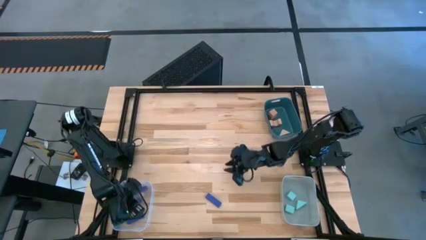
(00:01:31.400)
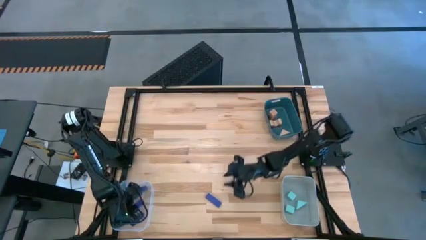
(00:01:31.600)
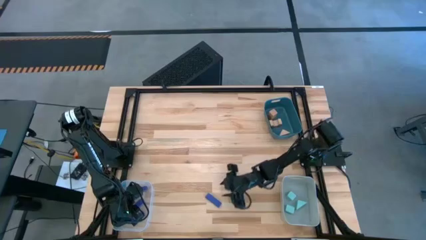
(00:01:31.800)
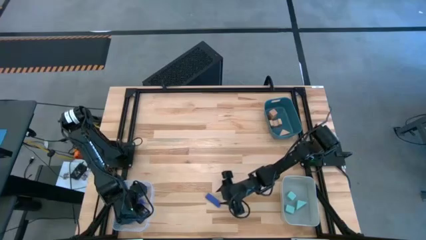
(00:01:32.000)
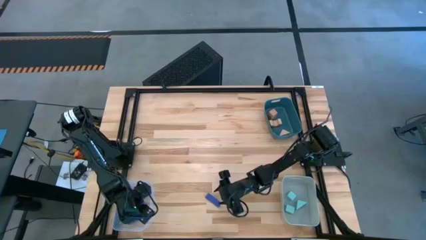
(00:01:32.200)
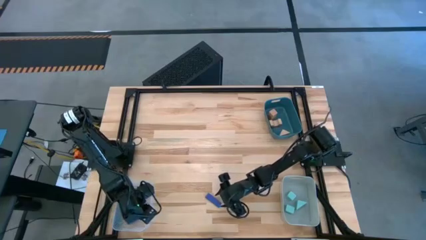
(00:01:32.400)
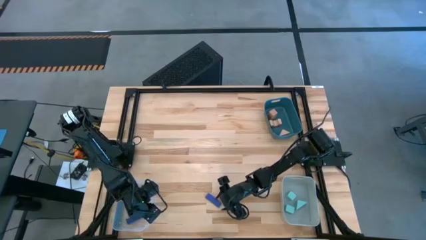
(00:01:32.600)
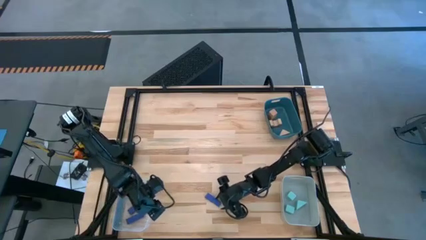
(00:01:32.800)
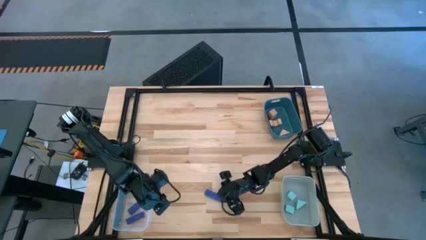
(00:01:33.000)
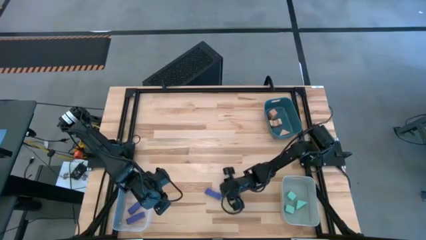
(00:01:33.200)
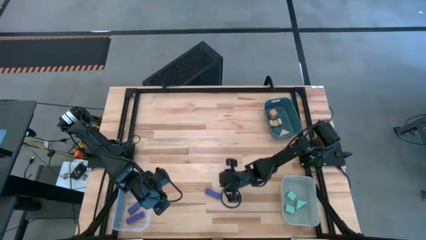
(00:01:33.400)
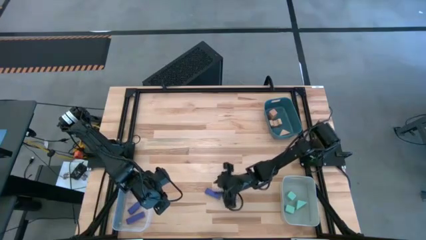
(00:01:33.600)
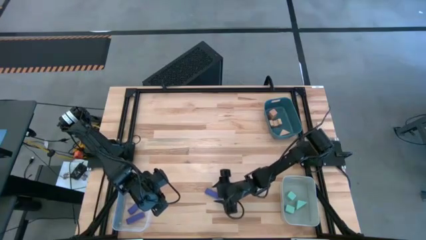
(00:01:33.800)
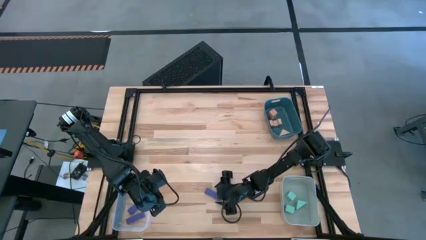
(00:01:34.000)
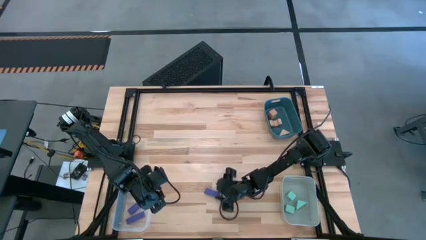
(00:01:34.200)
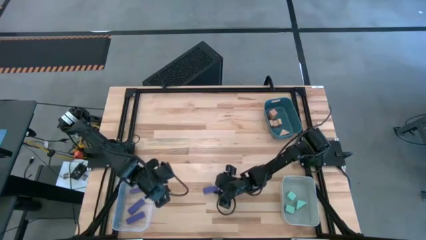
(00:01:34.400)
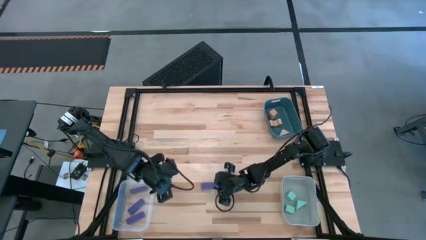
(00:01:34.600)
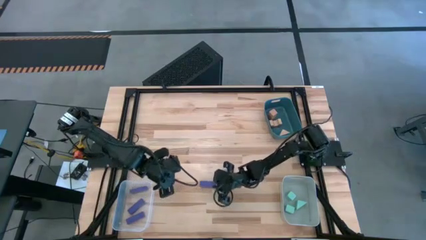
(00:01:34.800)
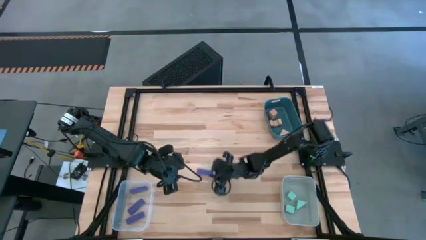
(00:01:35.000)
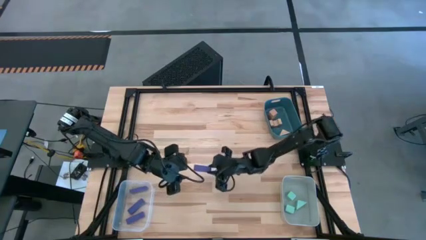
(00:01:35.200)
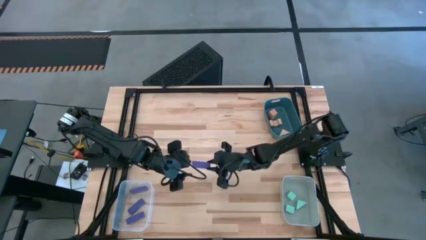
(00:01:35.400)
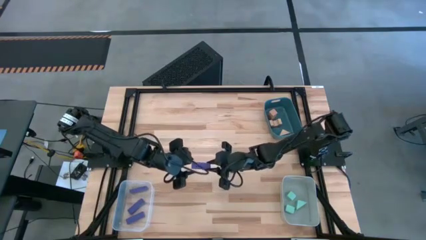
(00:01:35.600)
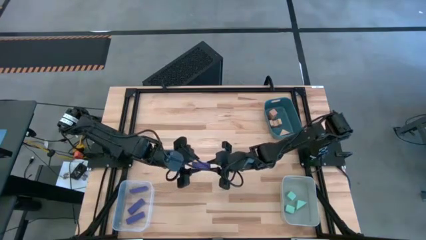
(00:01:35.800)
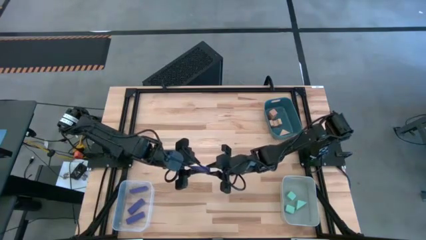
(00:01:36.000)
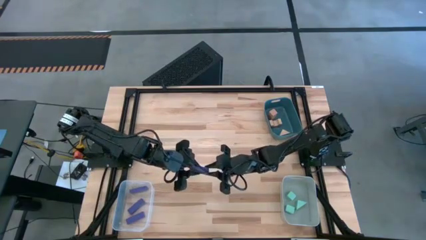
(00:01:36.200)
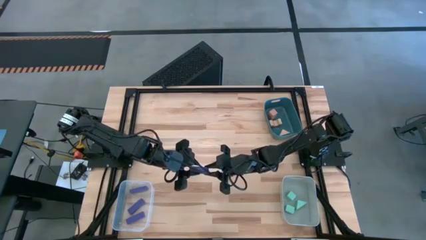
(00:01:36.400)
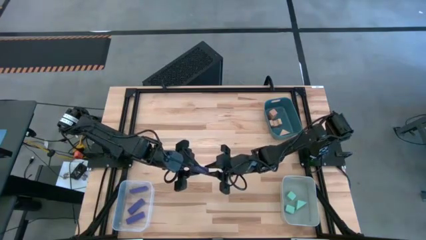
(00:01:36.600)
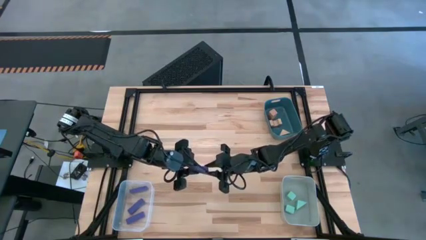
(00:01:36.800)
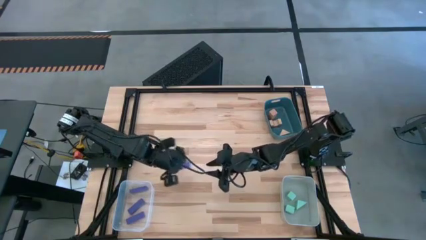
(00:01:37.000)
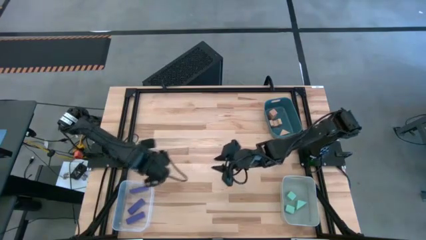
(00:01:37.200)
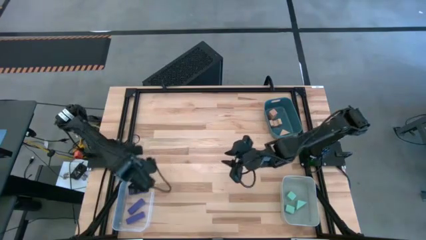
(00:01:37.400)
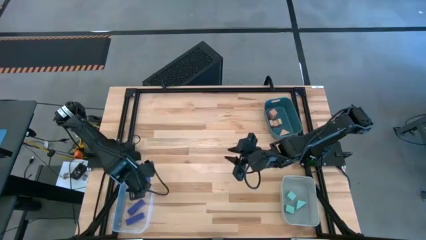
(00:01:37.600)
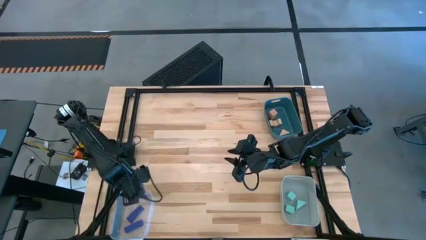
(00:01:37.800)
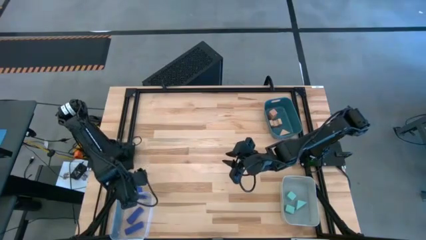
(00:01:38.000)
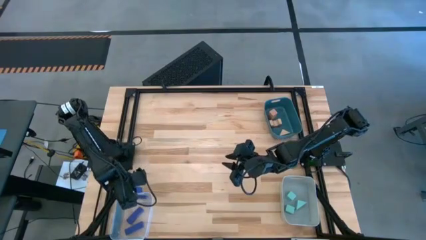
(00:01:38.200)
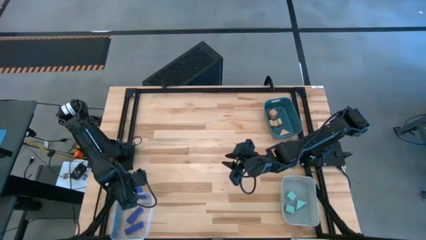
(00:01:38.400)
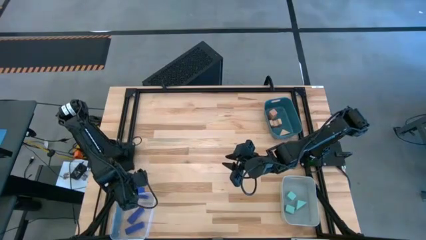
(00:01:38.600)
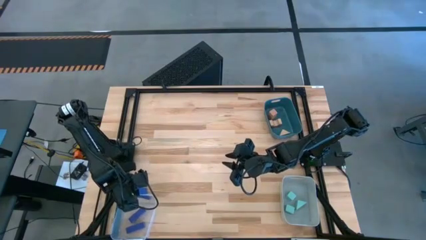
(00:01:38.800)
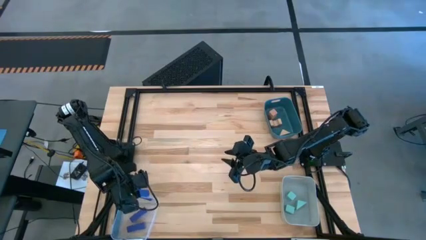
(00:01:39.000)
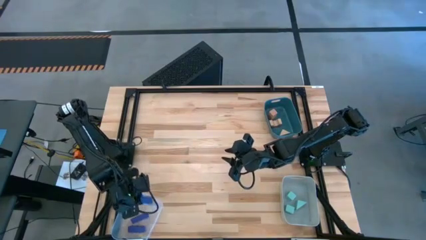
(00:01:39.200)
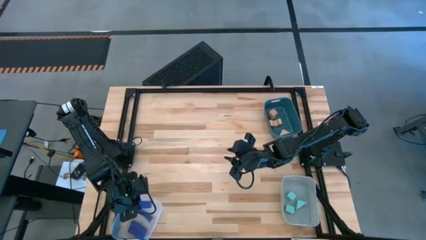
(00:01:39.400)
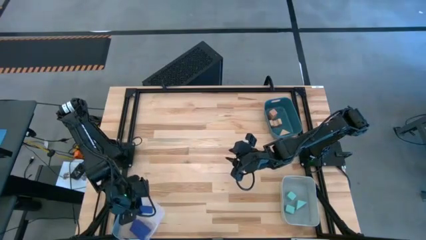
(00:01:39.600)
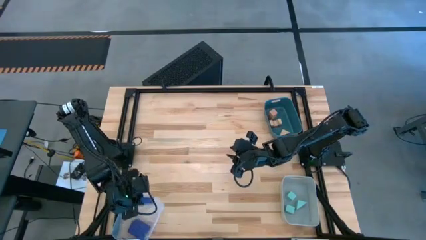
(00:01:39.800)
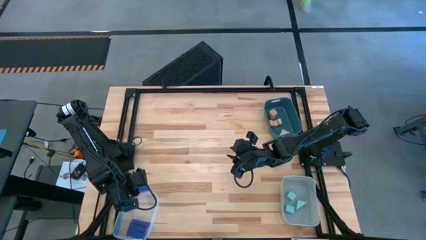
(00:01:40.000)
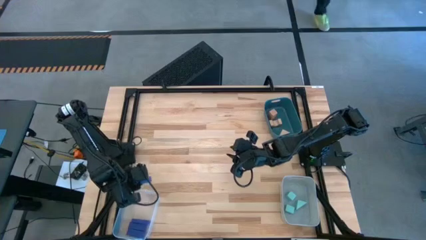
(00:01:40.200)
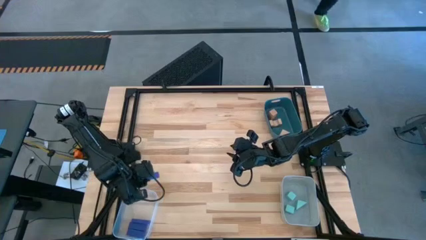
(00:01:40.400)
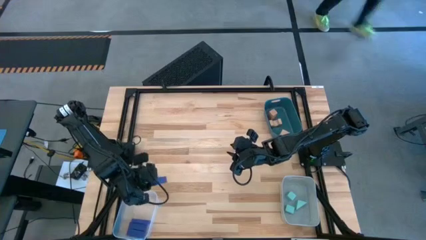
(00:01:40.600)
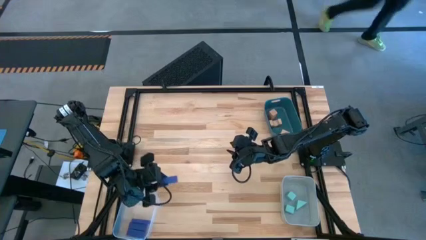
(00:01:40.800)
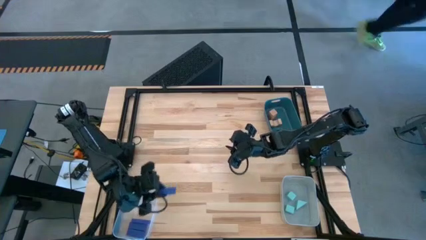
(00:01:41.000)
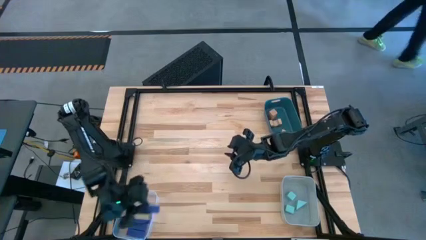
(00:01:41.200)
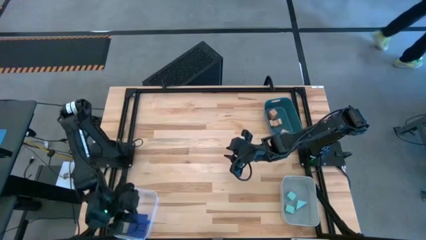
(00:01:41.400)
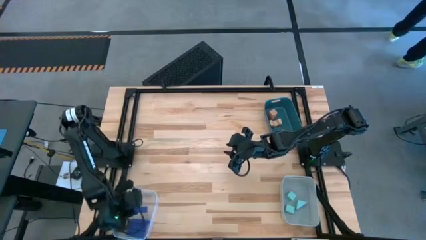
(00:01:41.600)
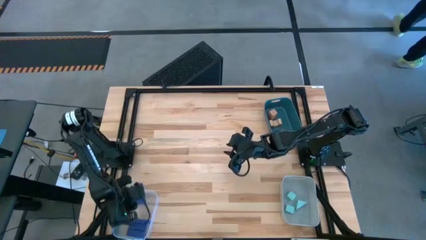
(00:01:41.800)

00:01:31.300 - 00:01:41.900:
Task: Sort & place blocks by color
Put the blue block into the transparent bin

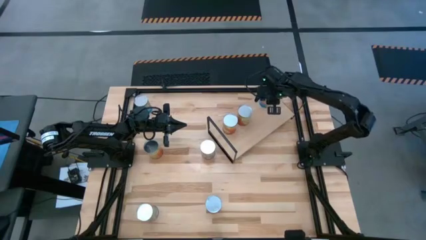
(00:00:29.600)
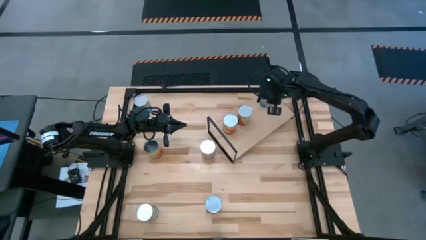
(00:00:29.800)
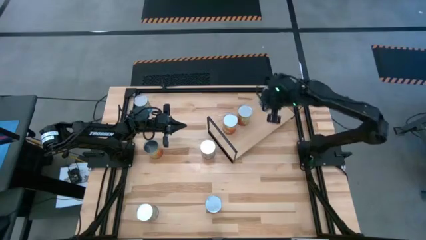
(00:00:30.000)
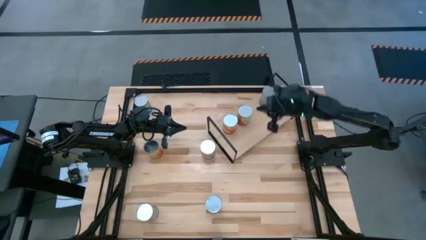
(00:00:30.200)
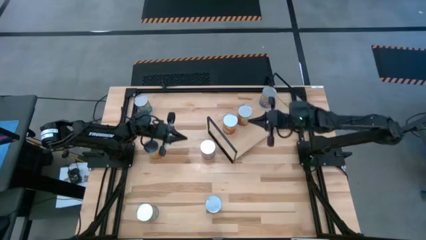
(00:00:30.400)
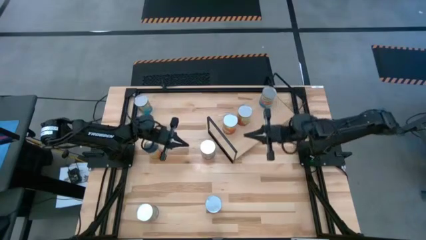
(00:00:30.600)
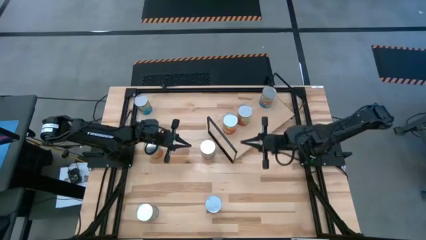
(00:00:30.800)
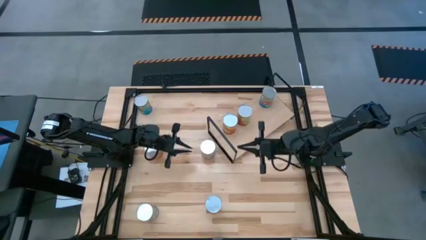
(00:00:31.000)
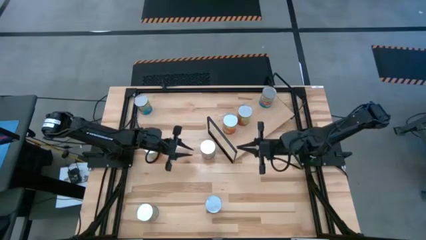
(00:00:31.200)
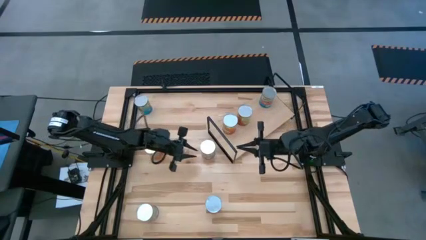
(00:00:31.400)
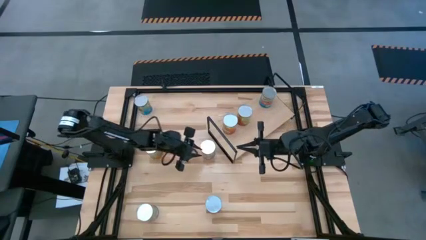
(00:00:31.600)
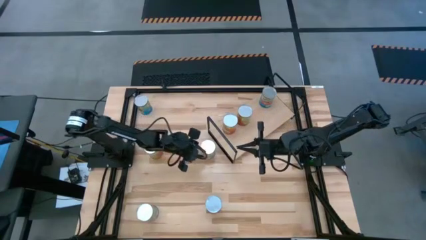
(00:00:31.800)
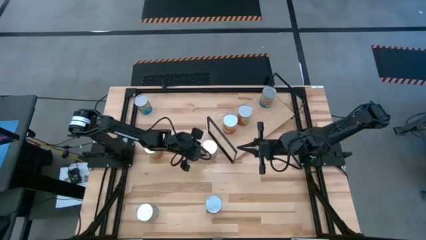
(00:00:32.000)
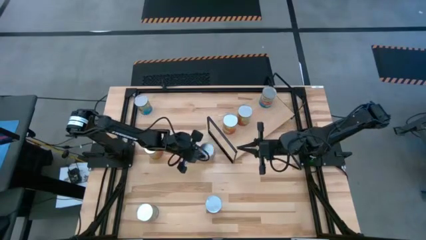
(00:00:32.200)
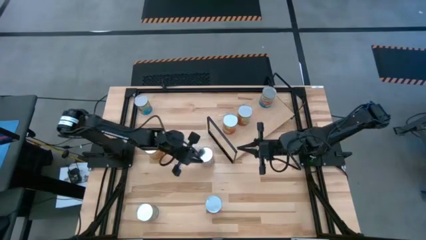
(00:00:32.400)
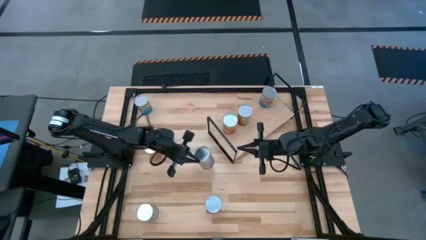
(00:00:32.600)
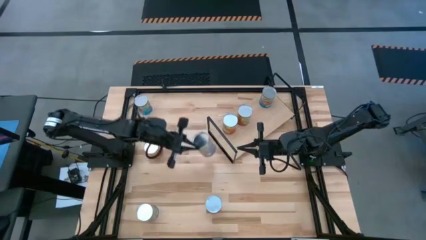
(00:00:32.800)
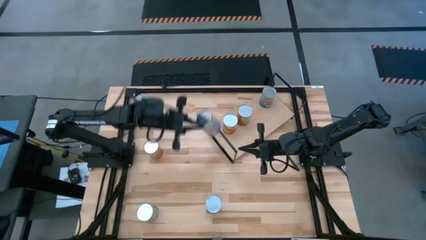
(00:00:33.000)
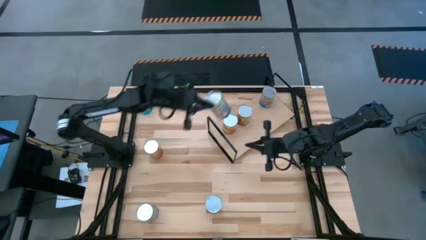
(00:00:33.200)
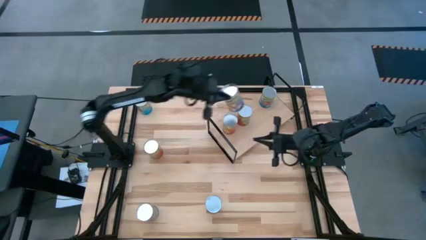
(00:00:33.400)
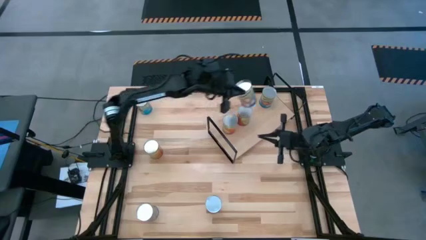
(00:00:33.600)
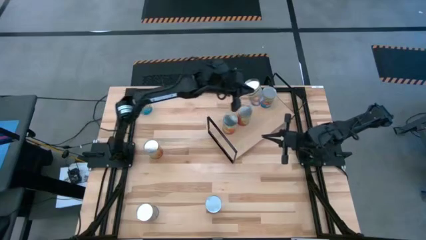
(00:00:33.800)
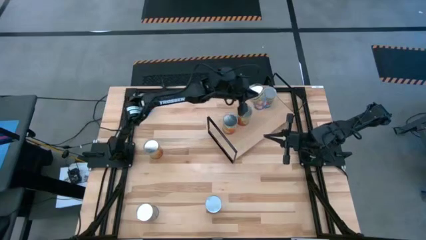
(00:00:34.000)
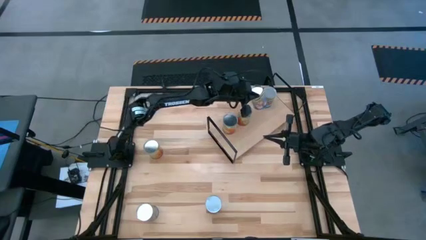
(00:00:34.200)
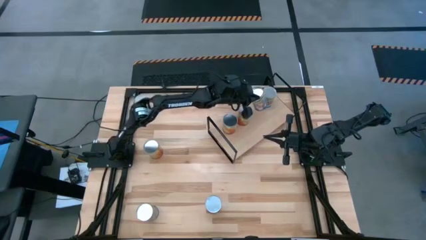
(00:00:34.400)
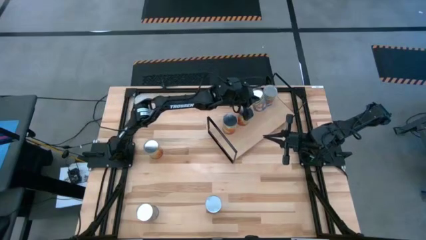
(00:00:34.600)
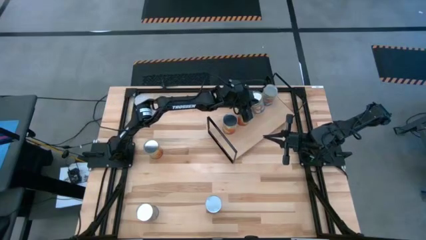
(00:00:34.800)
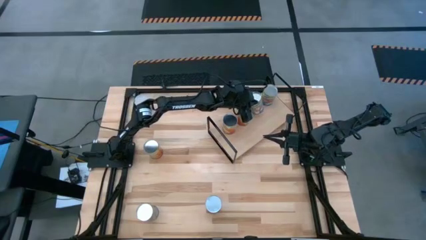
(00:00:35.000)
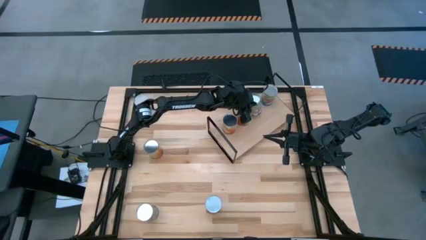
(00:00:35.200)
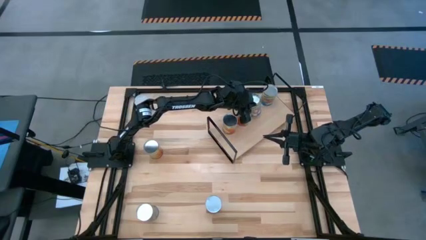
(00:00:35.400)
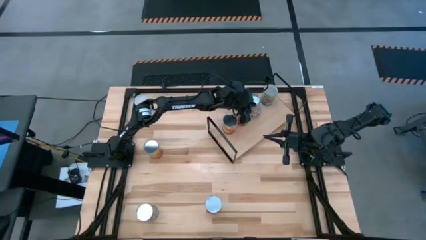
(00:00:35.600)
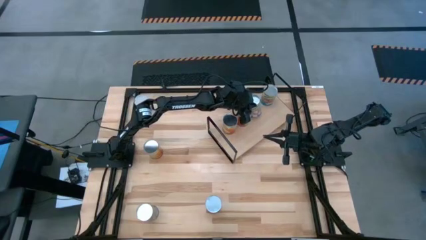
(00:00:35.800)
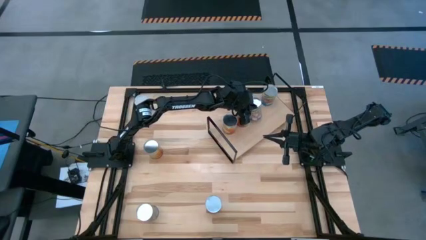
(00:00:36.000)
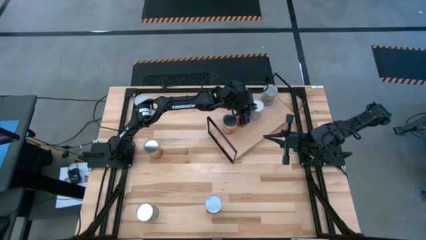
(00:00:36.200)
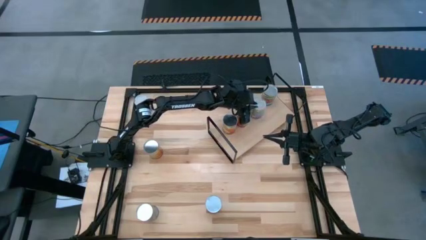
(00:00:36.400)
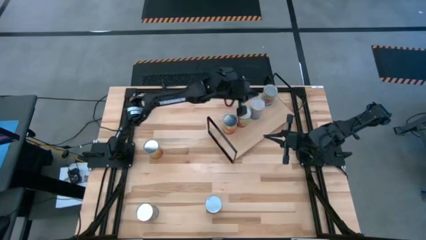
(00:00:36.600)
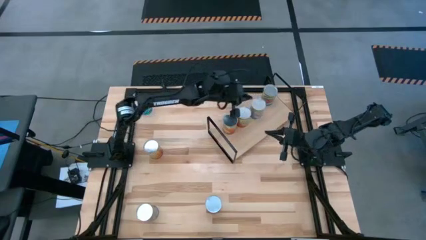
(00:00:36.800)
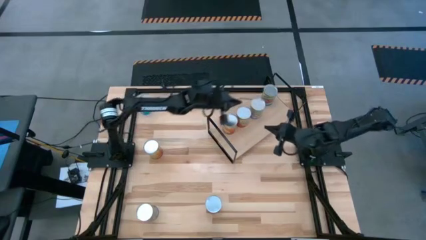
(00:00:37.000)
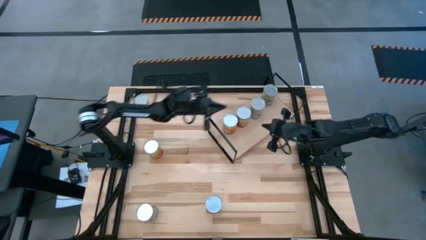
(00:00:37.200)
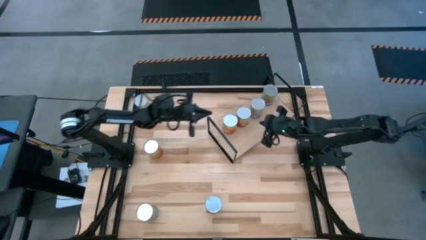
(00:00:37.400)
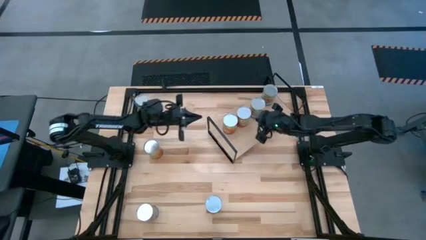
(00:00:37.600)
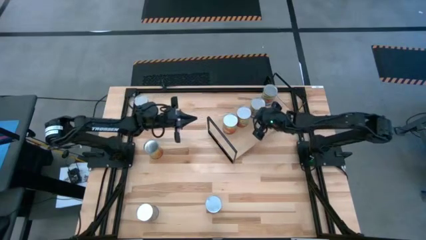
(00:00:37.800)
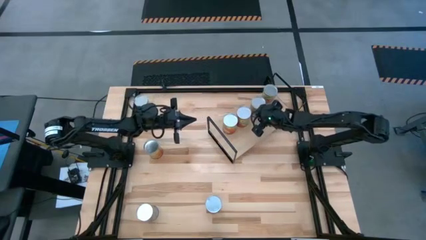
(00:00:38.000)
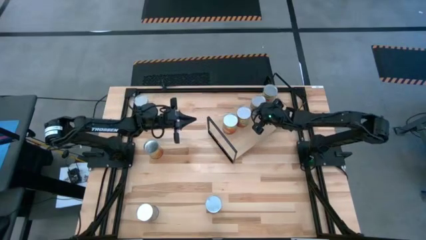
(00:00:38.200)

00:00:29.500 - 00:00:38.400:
Task: Pick and place cans onto a shelf
Put the top canned peaches on the shelf
